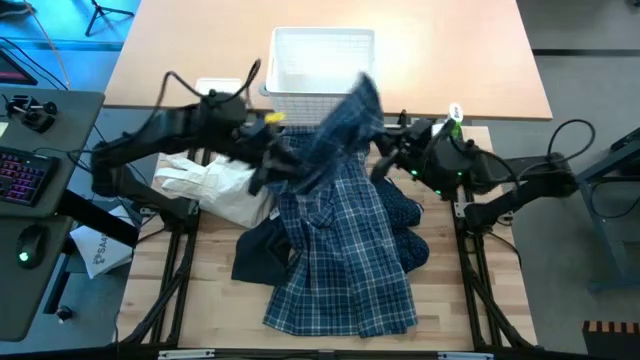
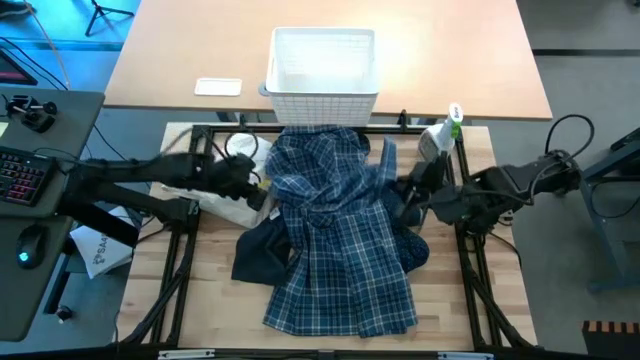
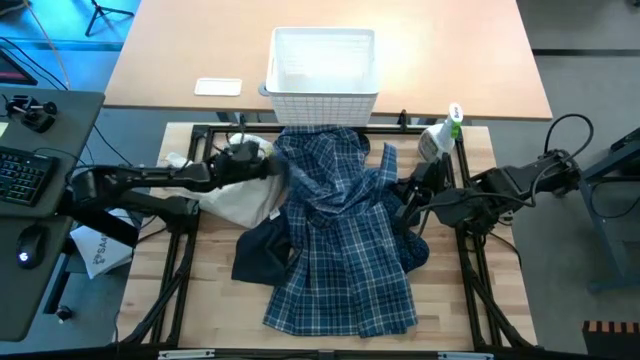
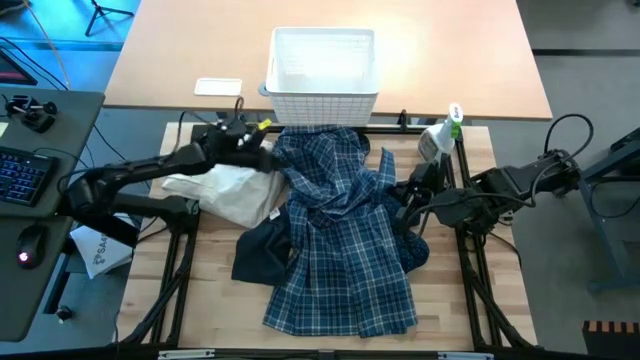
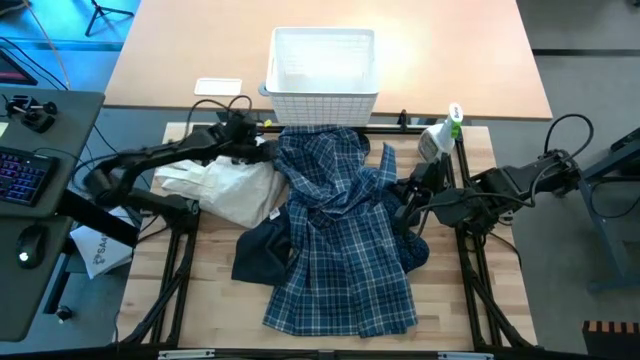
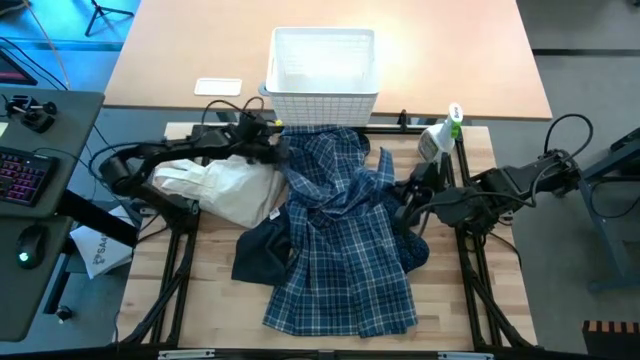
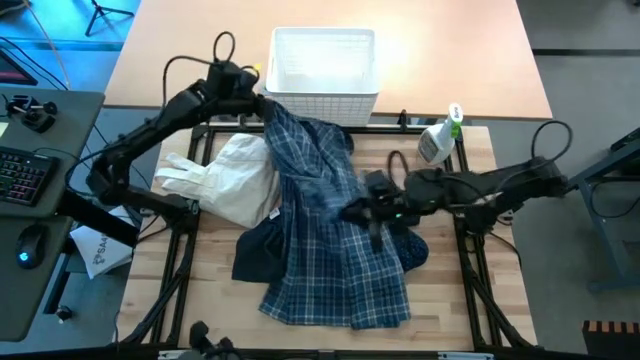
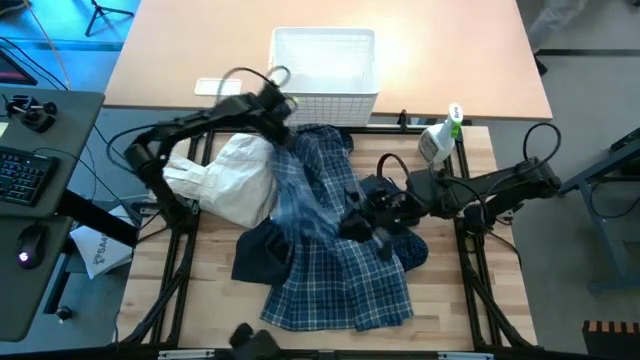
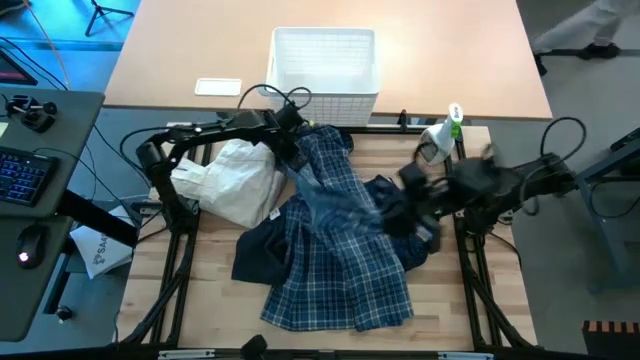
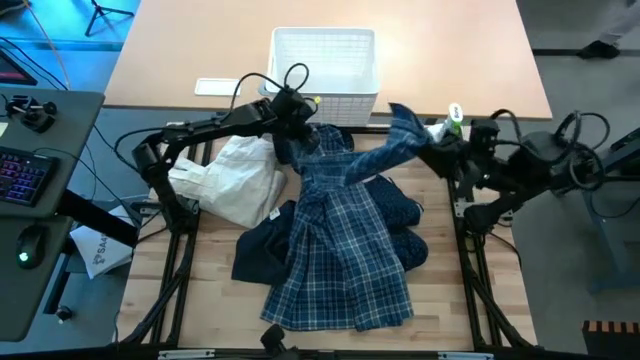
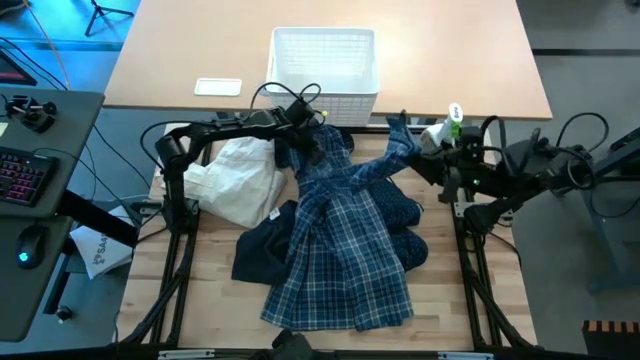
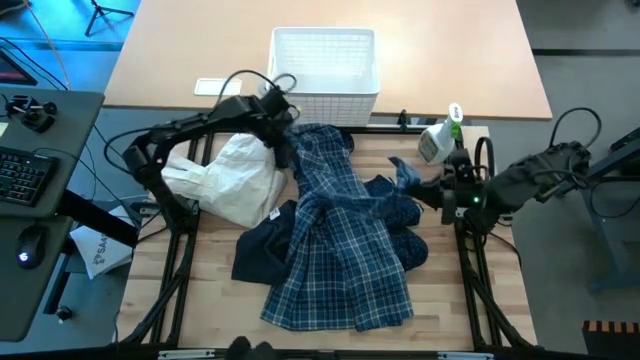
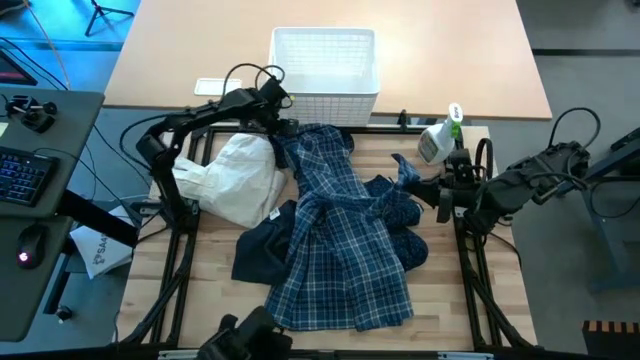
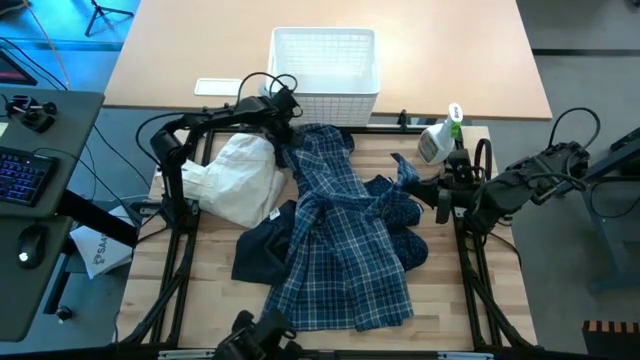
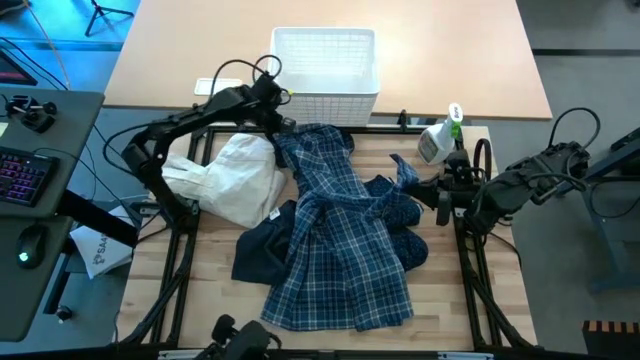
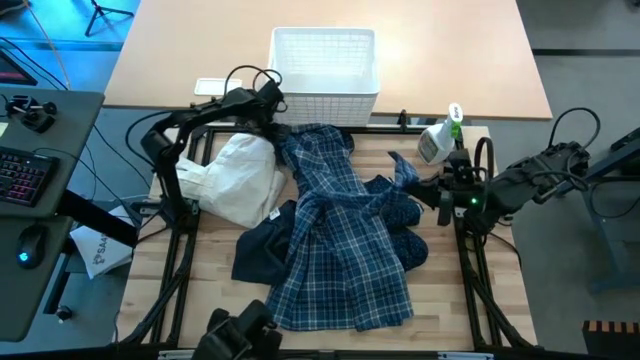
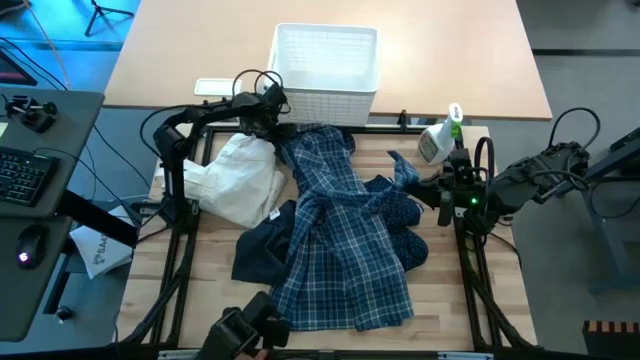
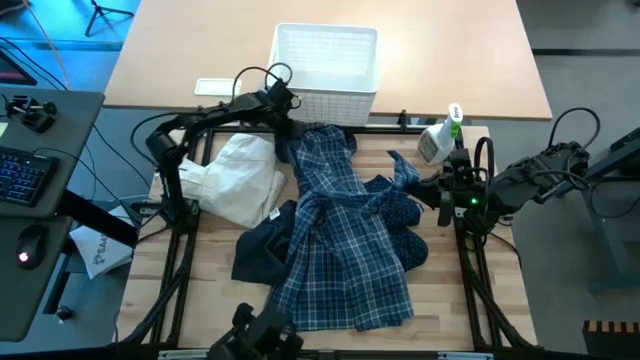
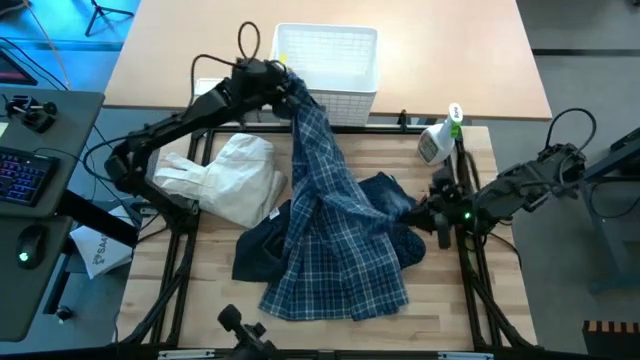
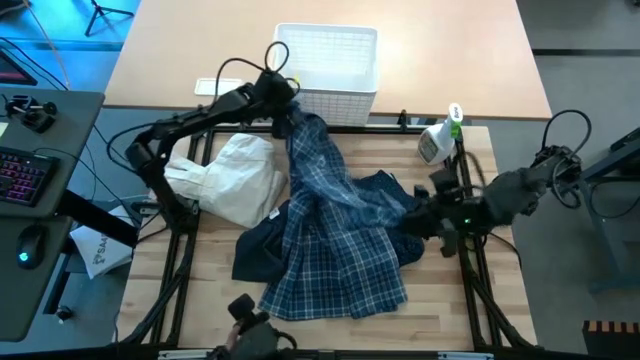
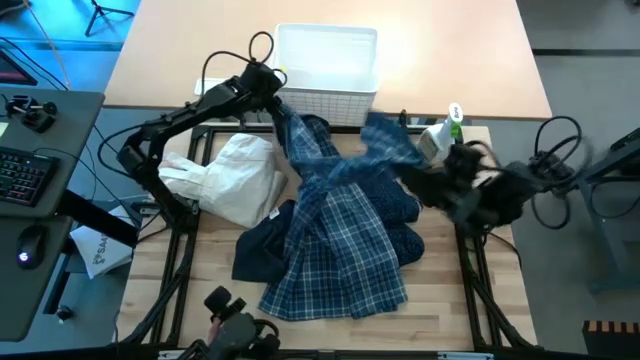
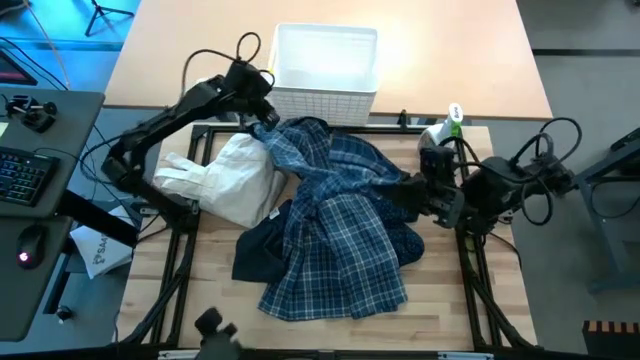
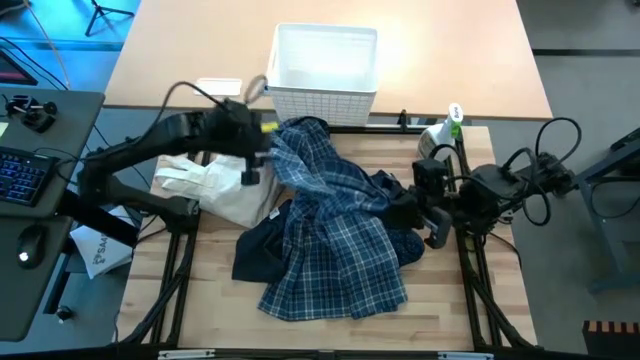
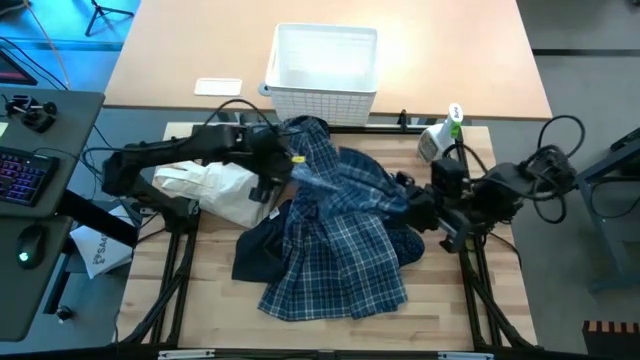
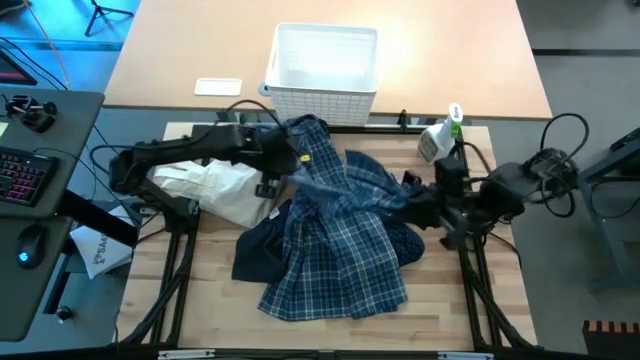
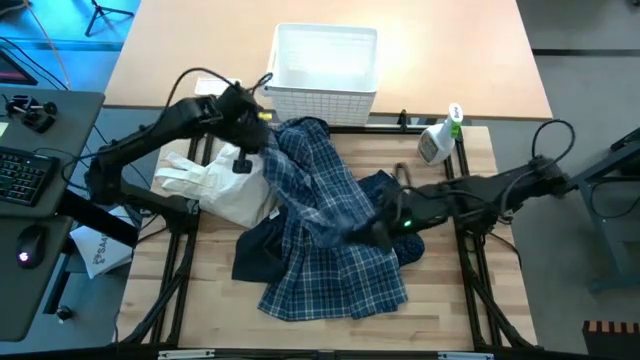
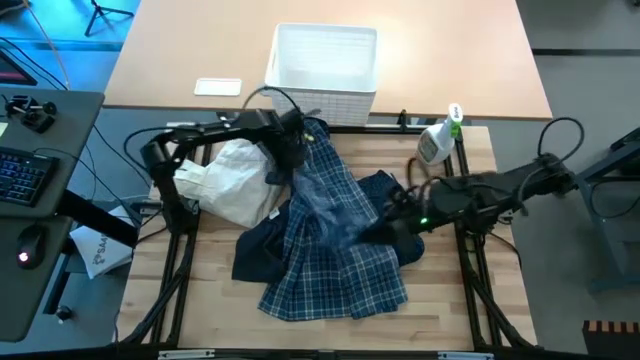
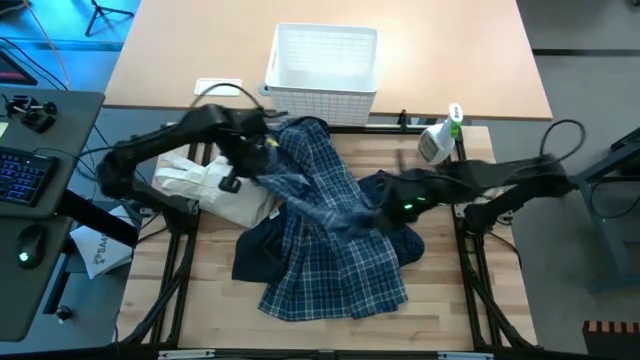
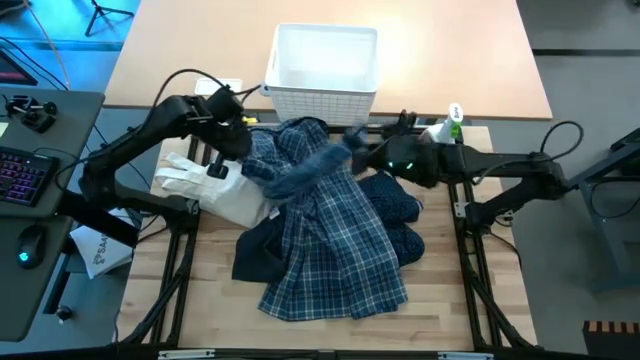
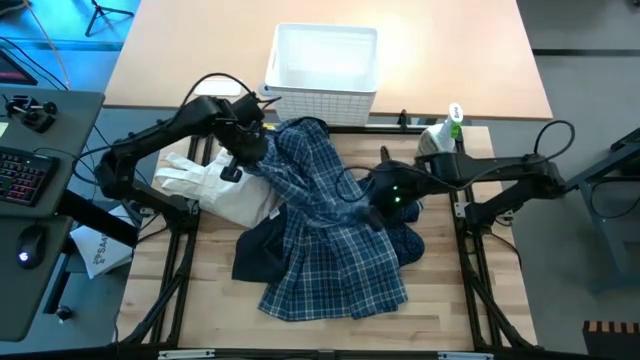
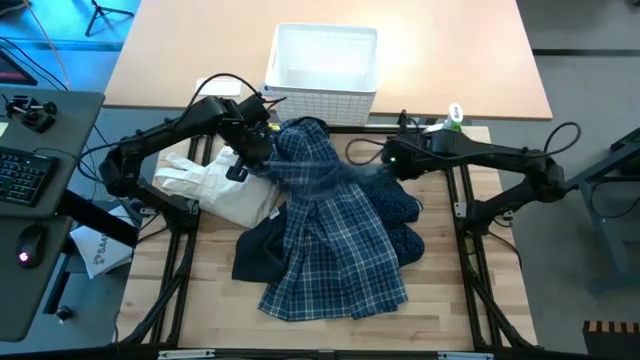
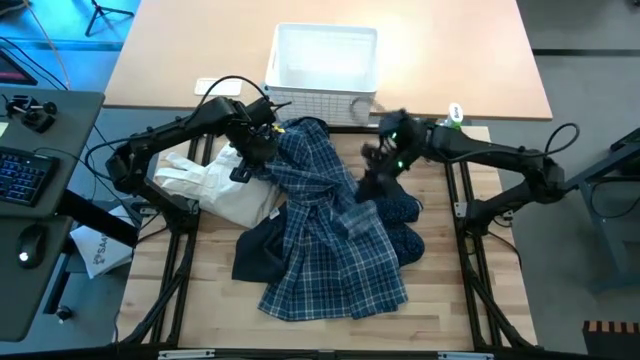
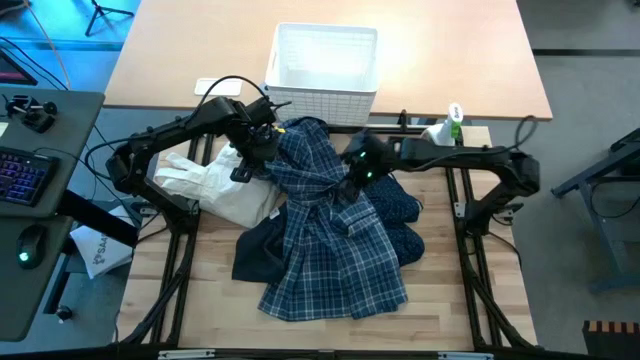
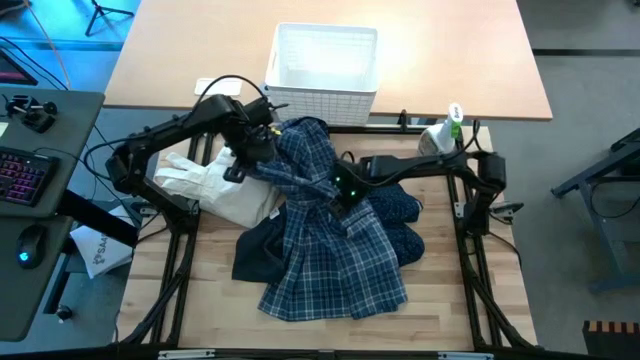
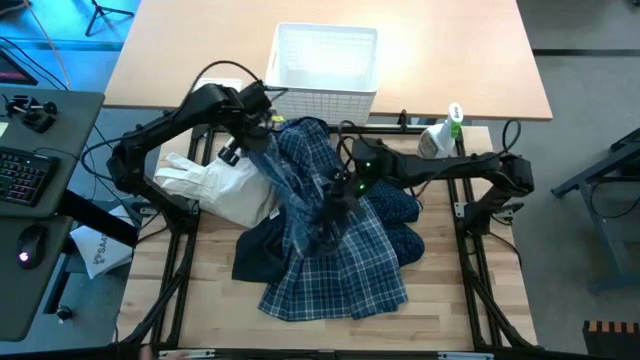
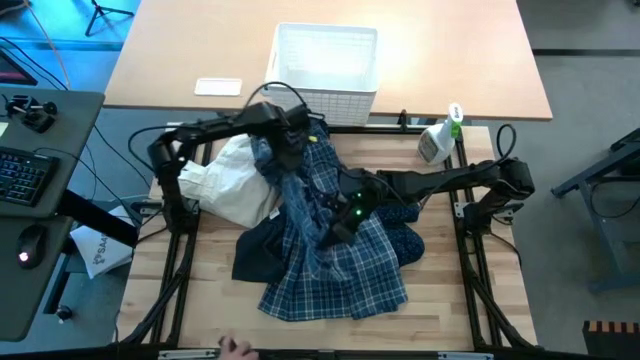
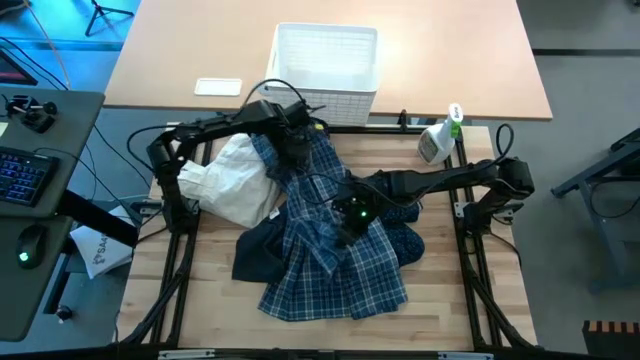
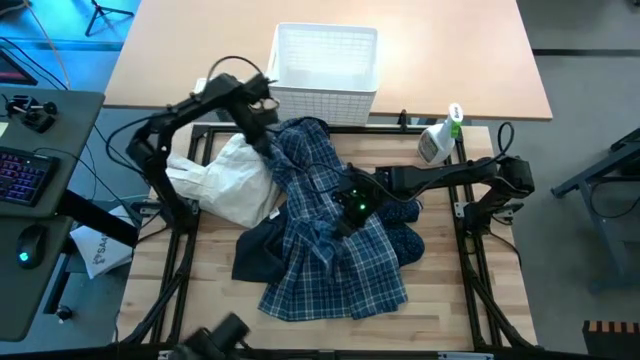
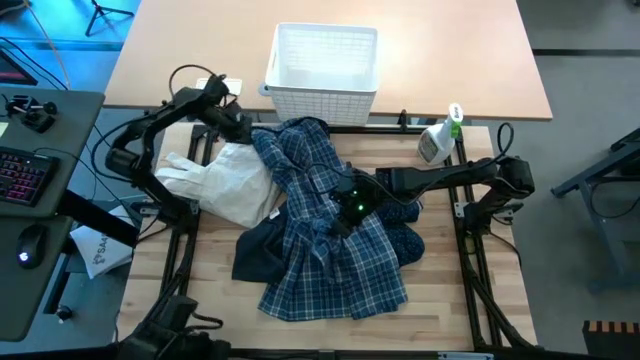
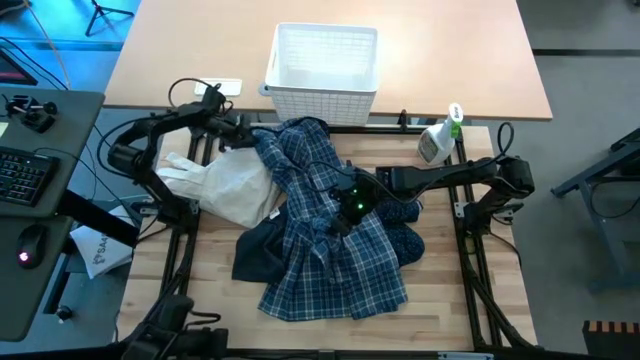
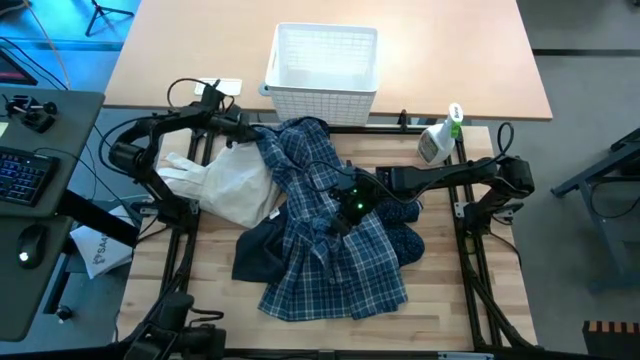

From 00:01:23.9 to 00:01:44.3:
Task: Fold laundry
Fold the blue plaid flannel shirt
